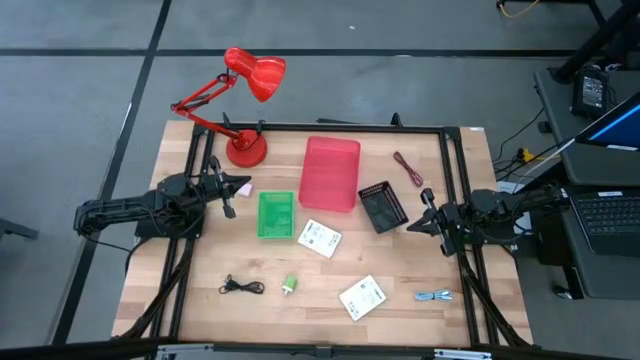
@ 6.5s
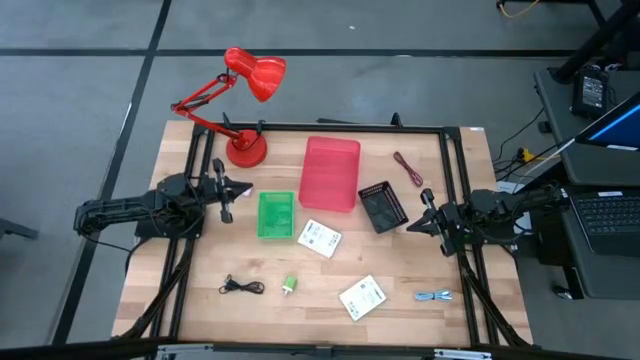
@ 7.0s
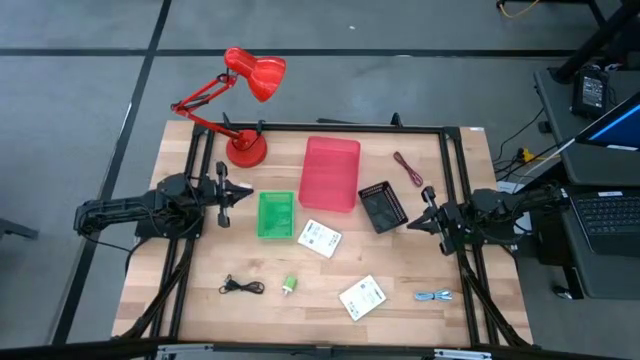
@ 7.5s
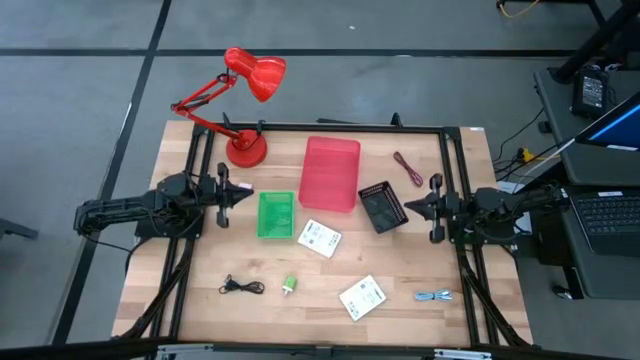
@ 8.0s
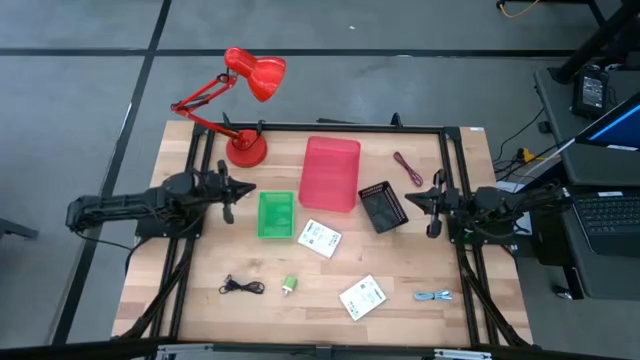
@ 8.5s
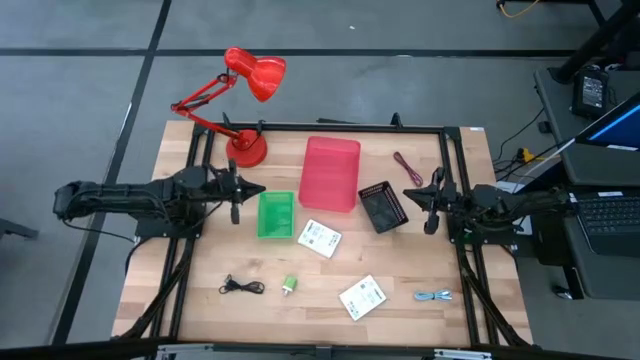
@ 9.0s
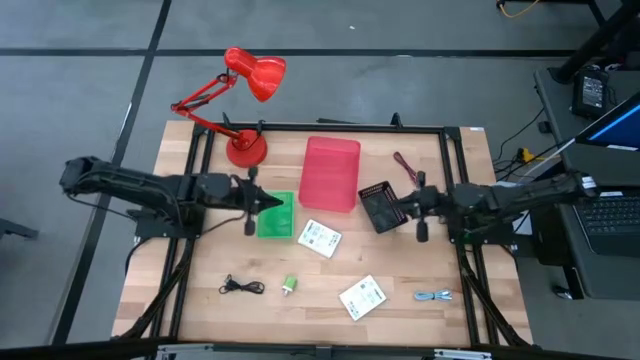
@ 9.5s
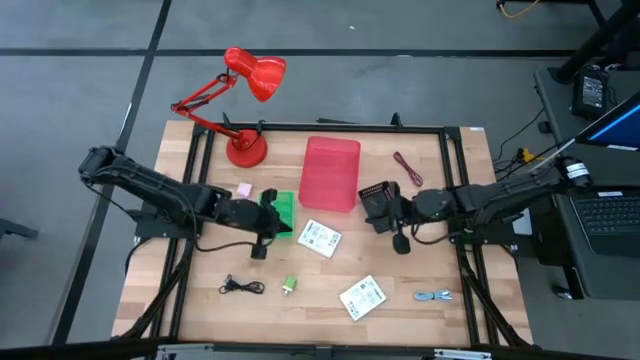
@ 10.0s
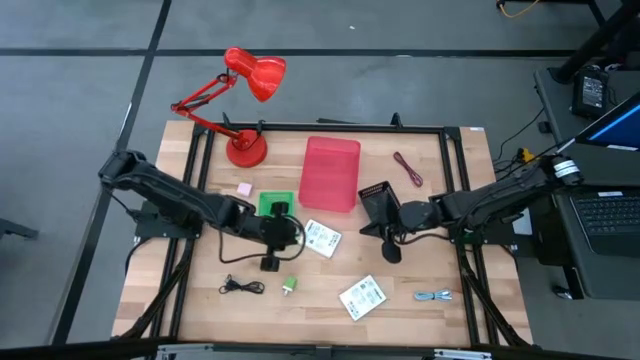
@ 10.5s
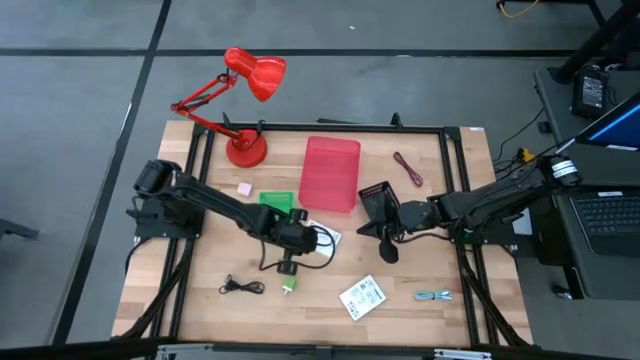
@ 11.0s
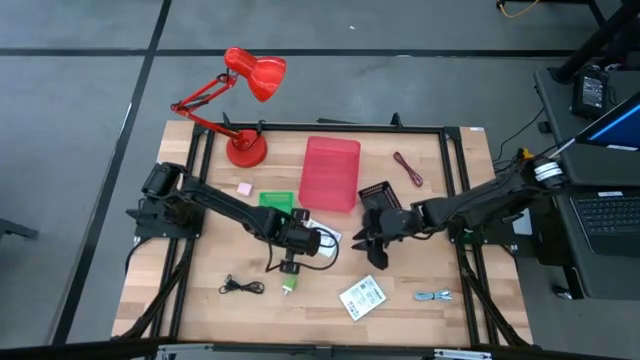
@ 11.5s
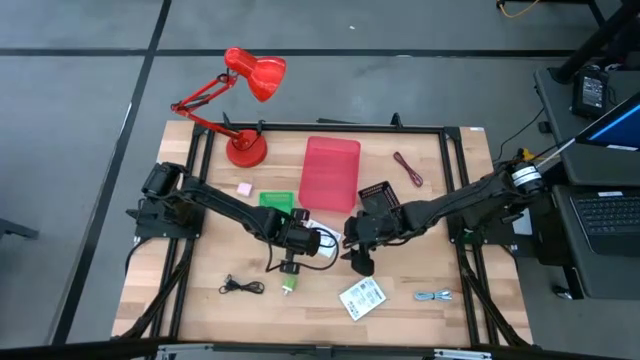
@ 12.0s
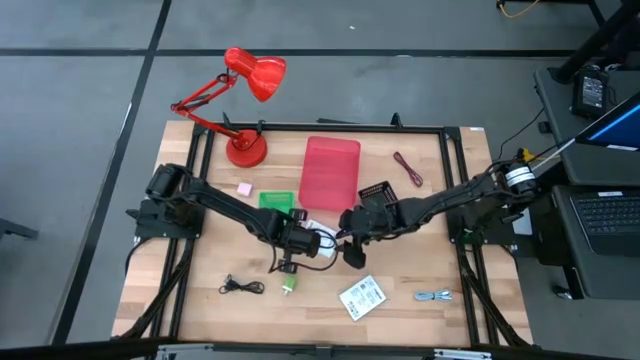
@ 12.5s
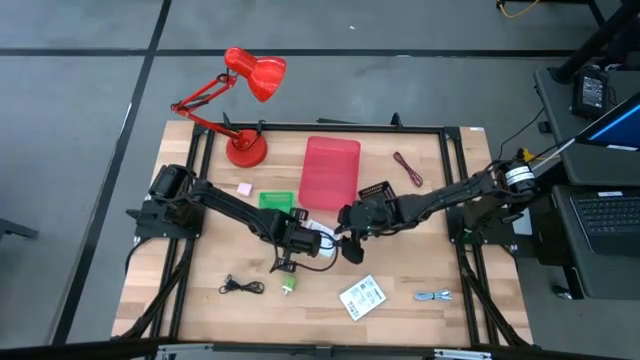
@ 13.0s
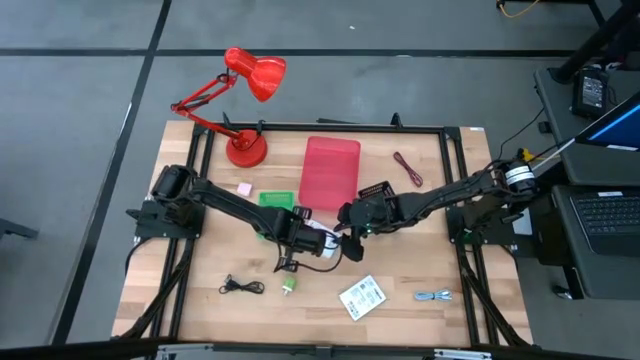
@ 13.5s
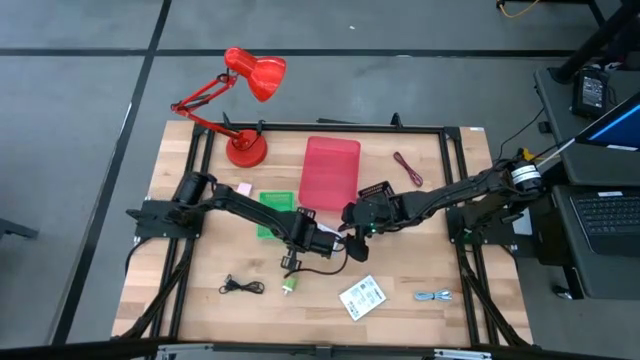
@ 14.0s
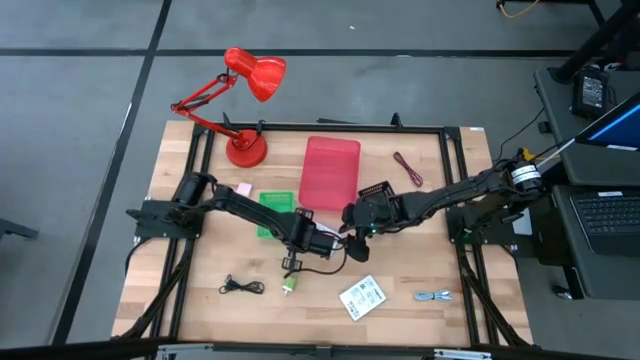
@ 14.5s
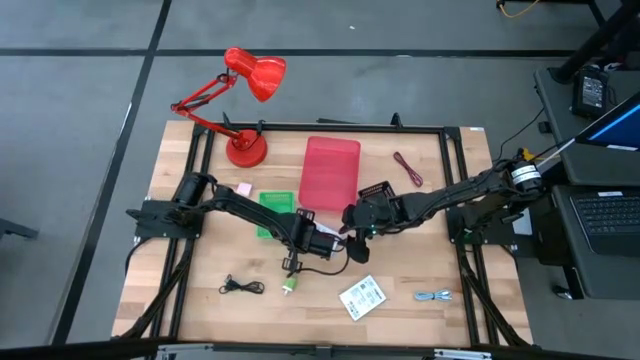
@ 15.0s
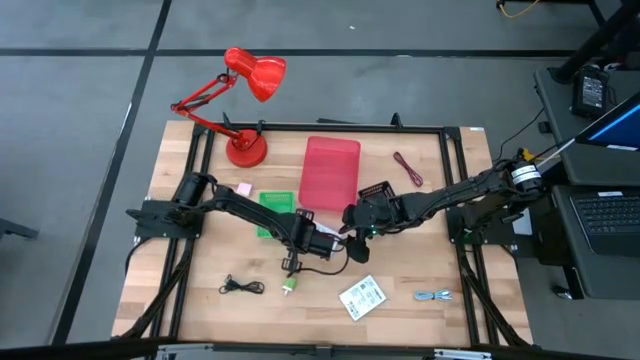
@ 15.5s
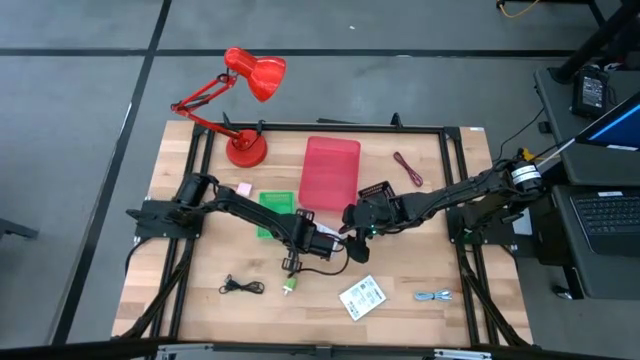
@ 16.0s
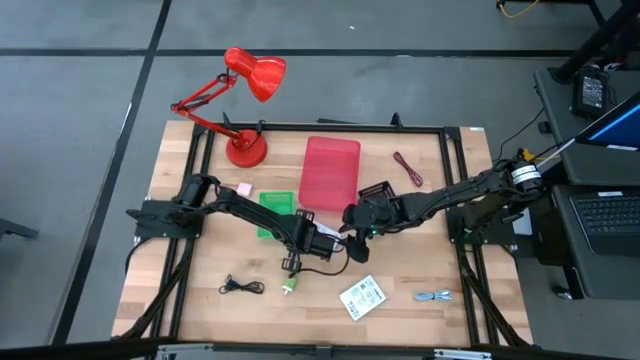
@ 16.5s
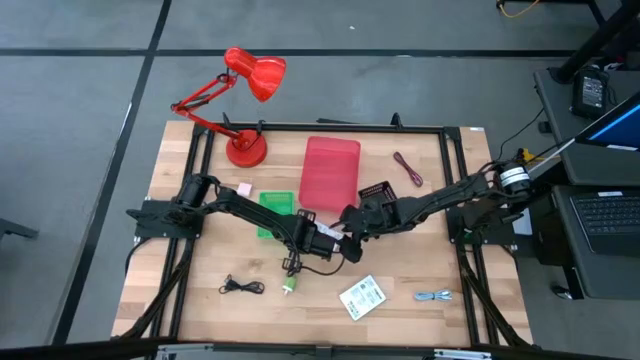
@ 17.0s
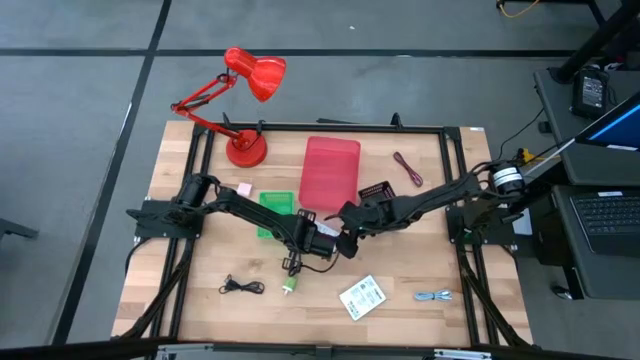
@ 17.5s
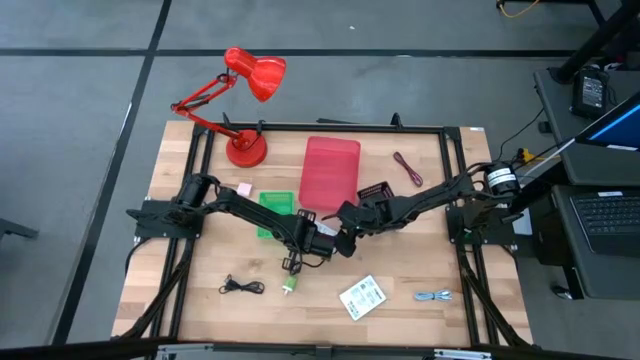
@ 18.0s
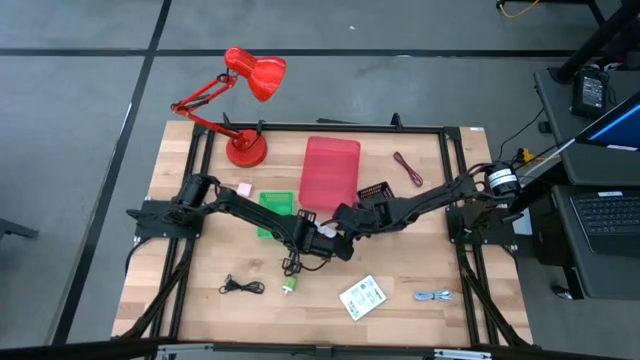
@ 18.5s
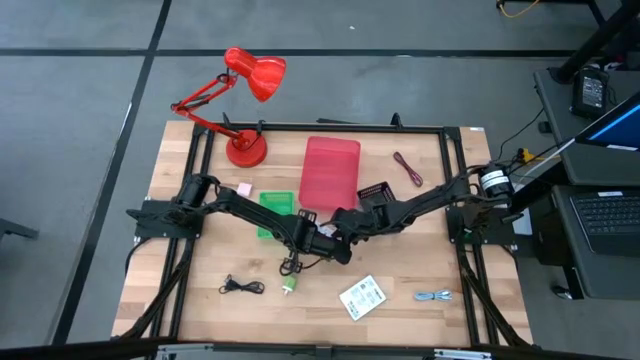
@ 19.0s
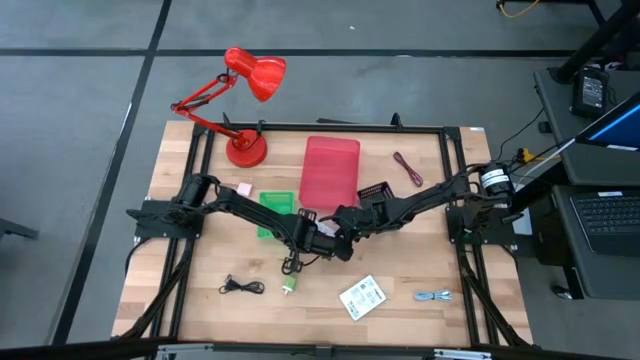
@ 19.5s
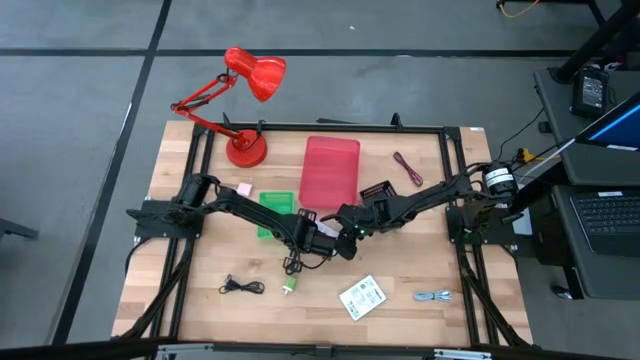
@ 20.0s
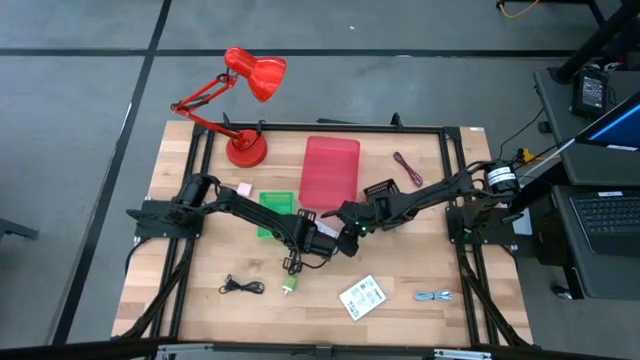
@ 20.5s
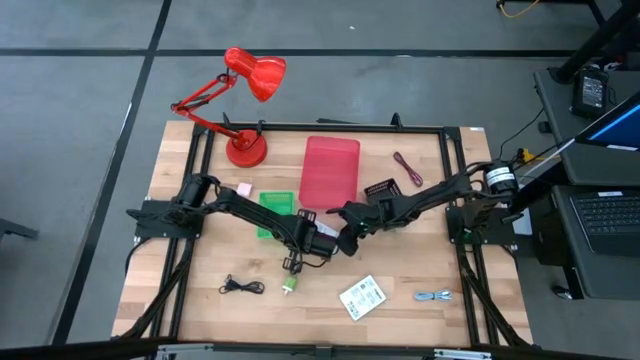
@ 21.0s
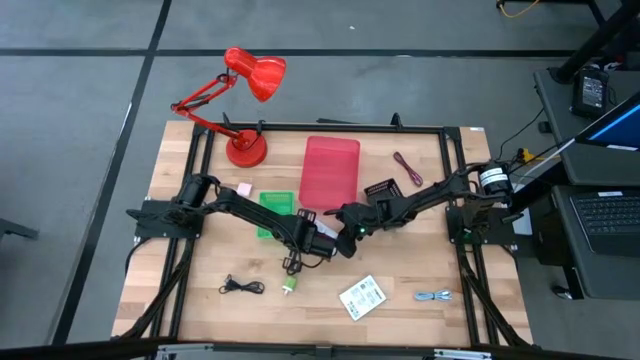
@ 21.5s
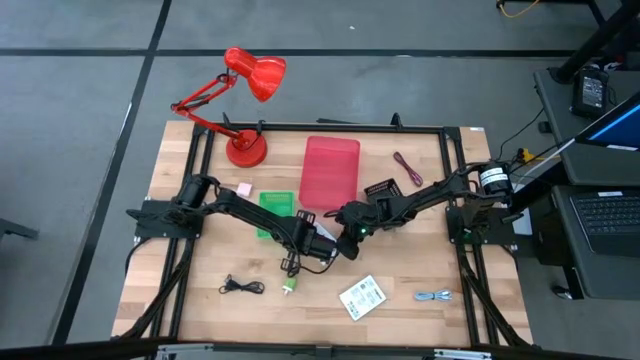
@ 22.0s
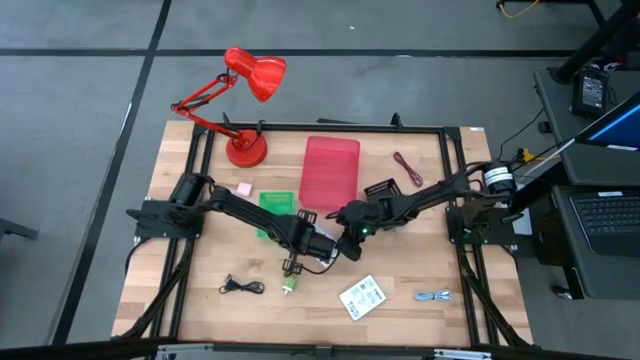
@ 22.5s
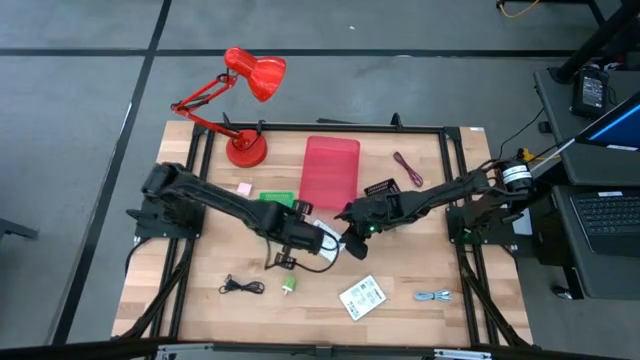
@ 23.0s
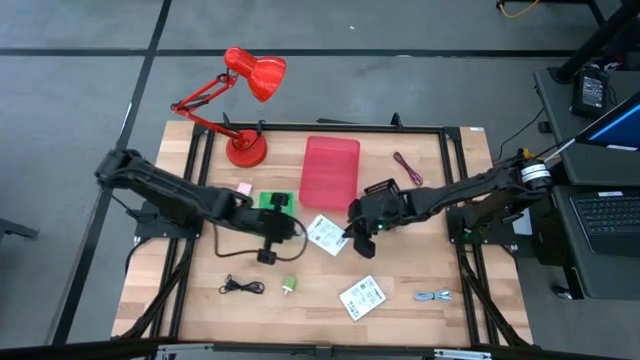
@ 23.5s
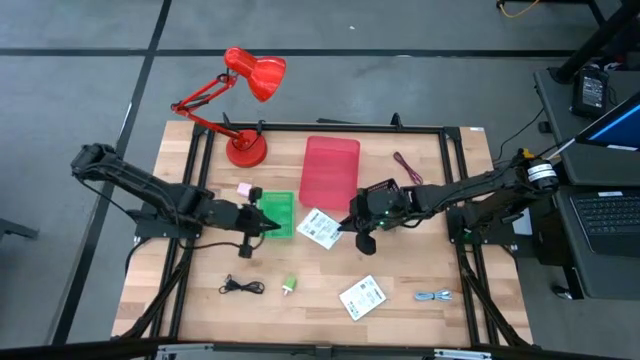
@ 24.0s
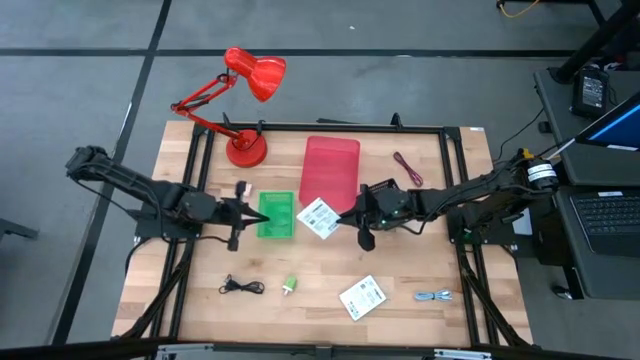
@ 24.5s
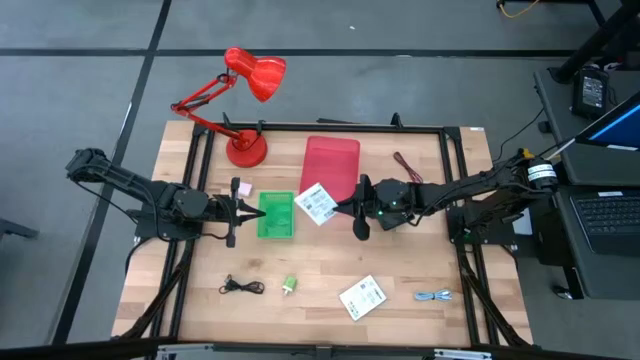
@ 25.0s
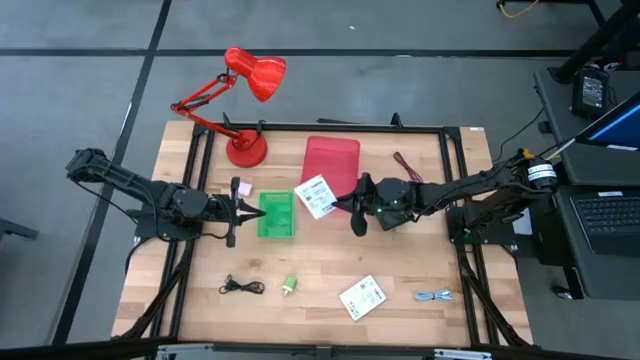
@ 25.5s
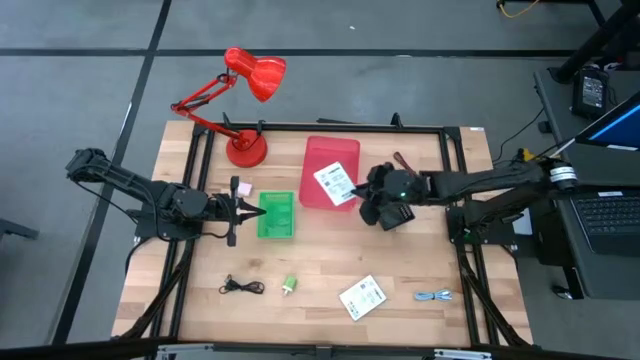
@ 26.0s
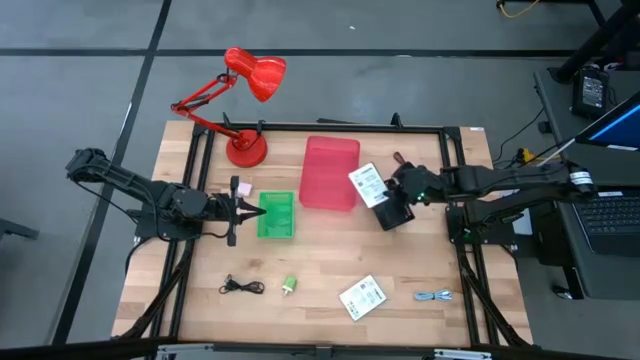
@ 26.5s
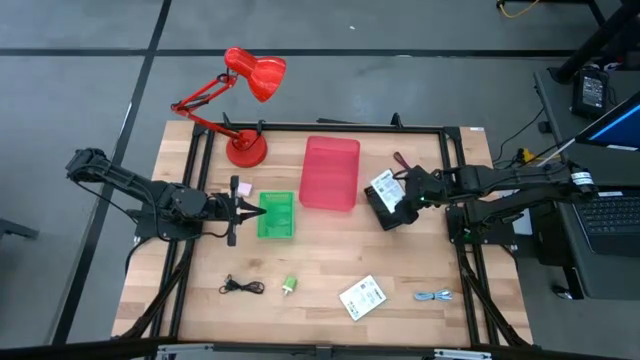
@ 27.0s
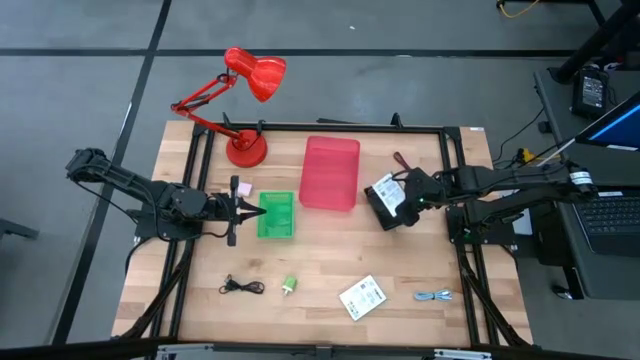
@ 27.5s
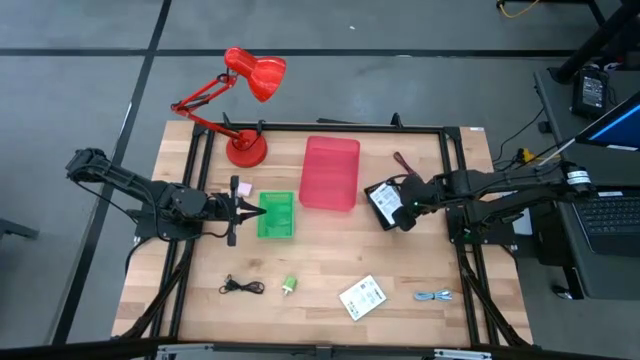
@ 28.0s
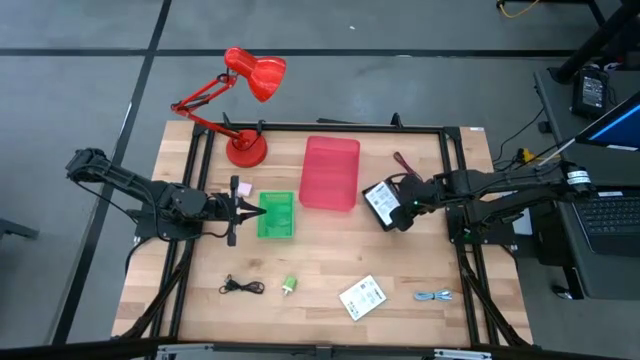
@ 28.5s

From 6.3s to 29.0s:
Task: Pick and place items into bin
Put the top white card reader box into the black bin
